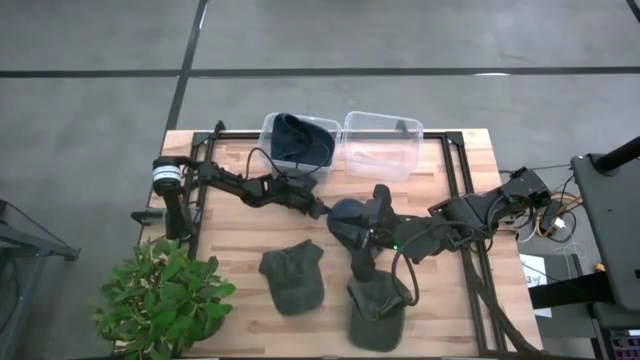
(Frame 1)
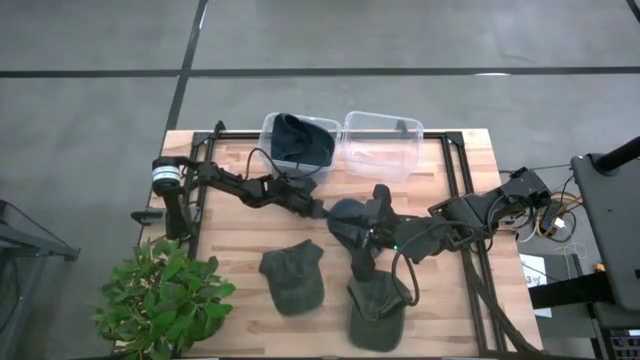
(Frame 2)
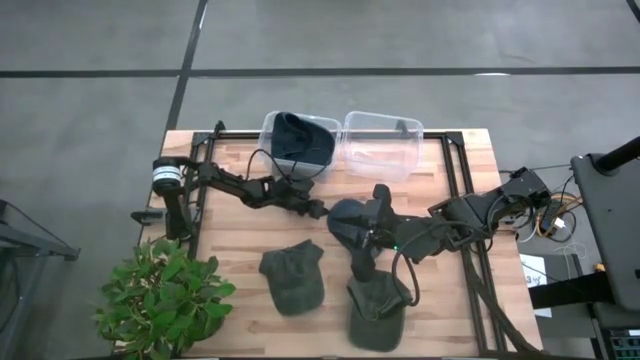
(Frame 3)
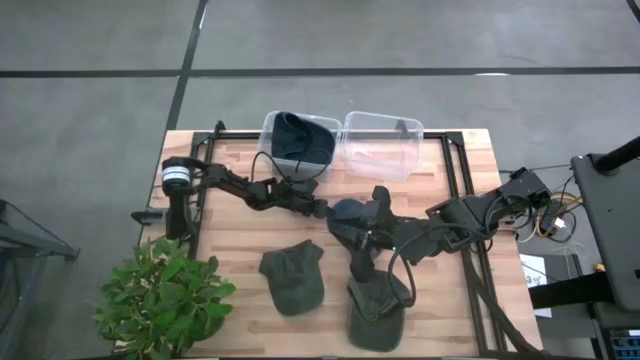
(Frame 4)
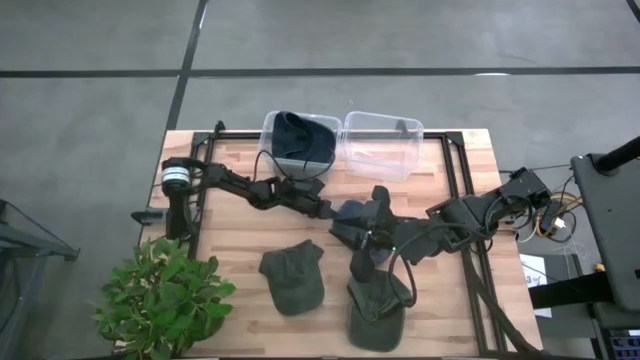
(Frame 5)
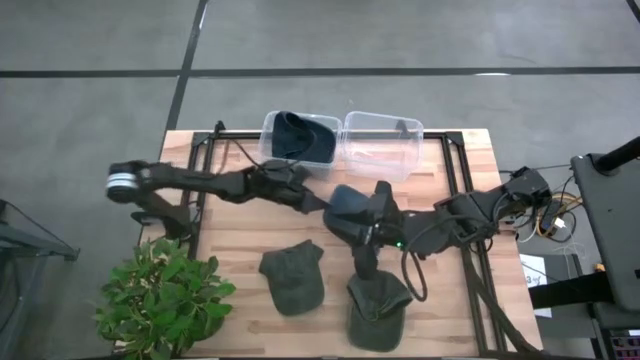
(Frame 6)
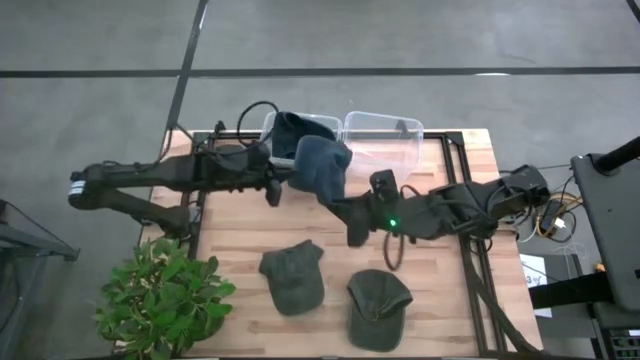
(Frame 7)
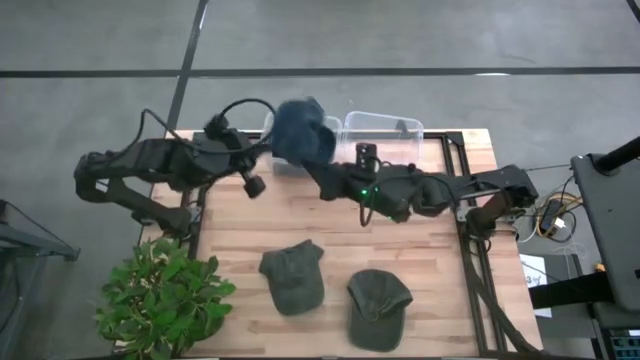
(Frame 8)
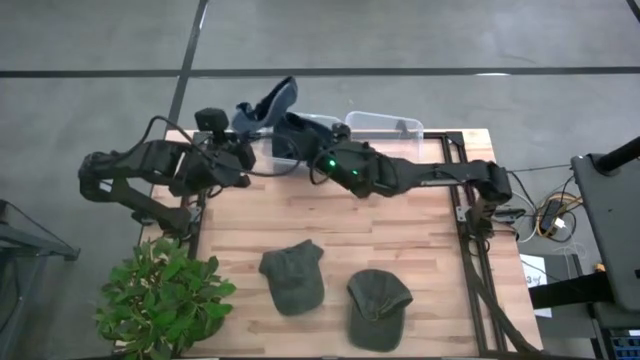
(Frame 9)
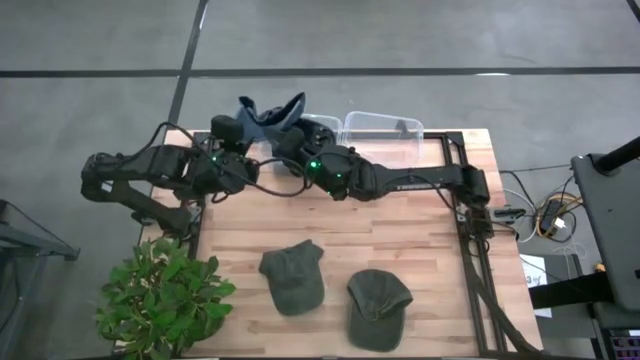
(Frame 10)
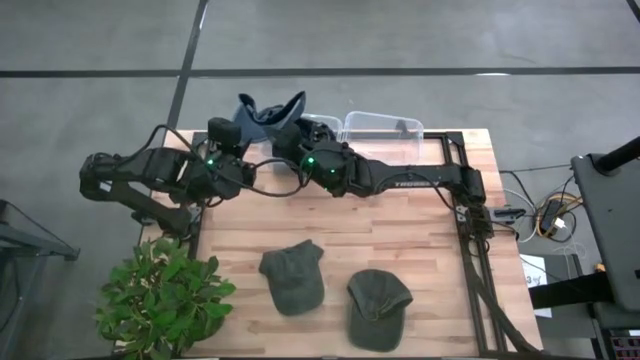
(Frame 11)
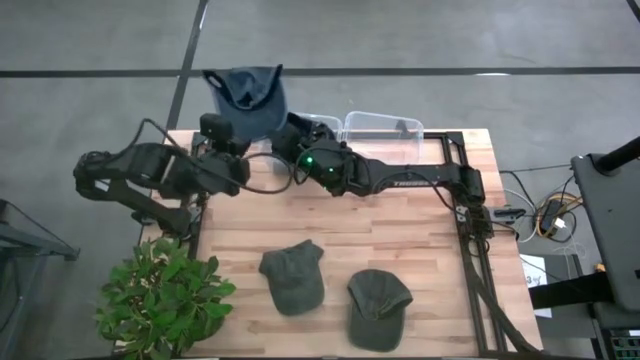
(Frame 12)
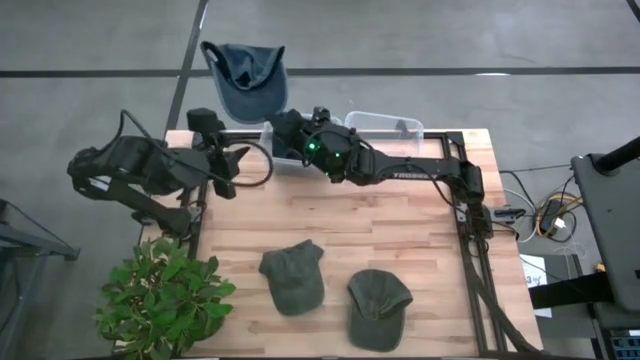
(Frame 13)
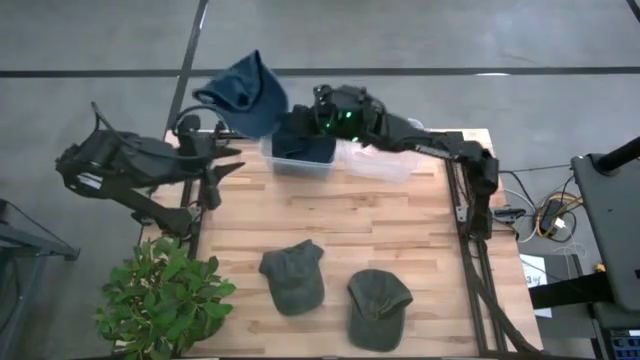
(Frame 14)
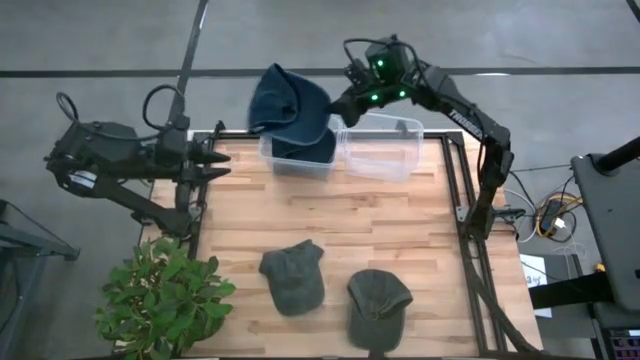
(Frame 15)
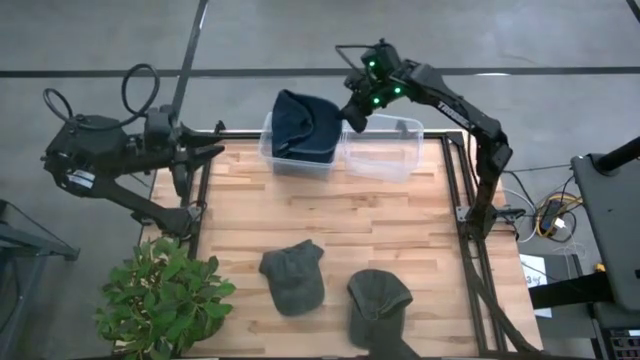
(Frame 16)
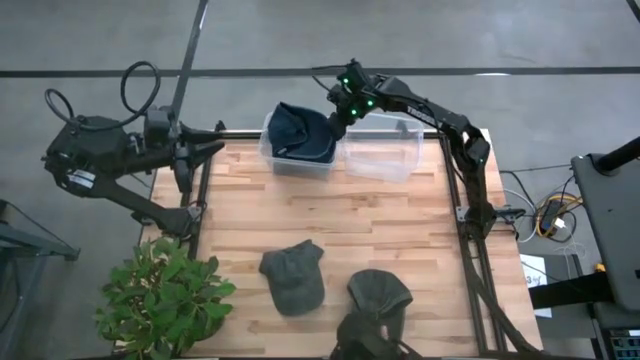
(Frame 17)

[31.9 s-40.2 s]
Task: Pick & Place hat
Put the blue cap into the left transparent bin

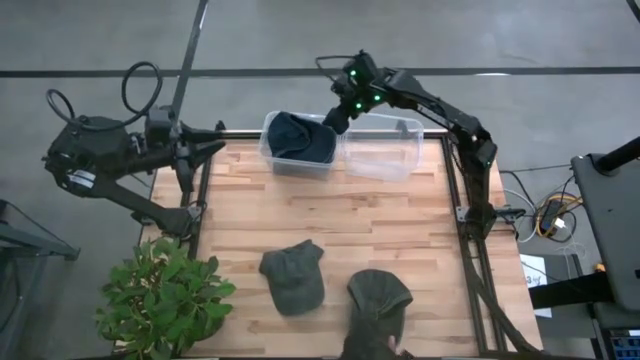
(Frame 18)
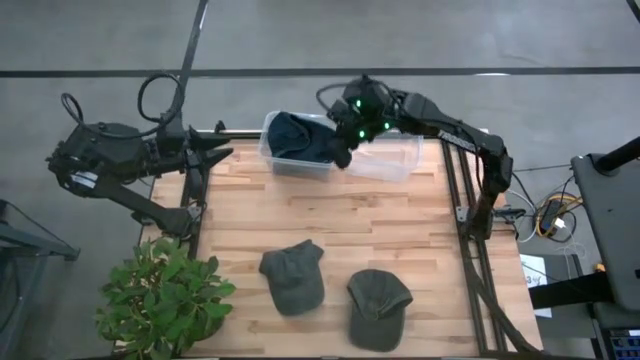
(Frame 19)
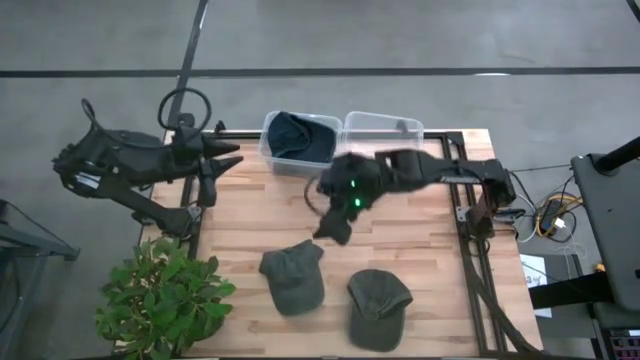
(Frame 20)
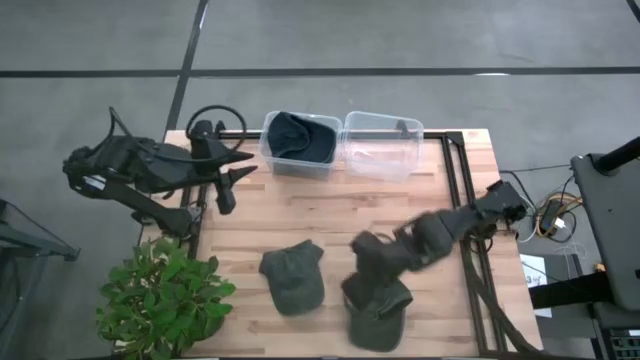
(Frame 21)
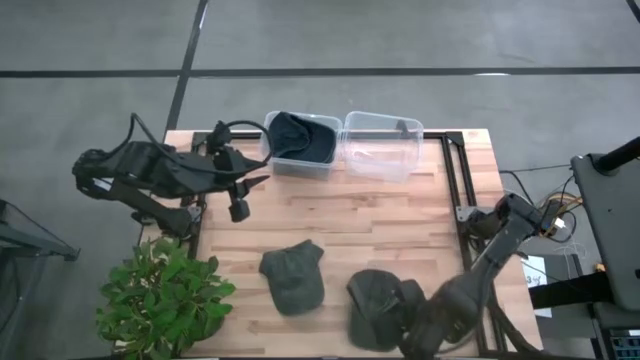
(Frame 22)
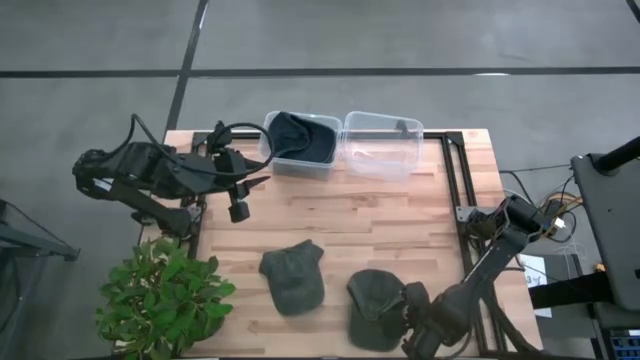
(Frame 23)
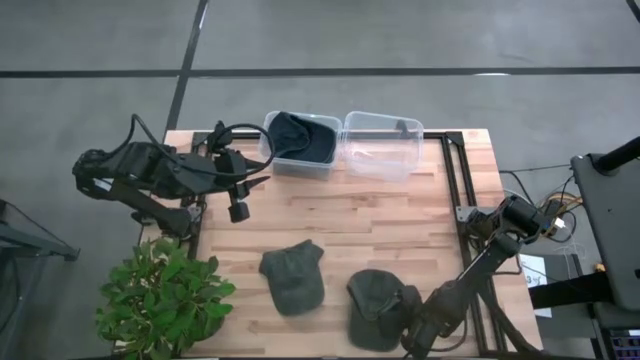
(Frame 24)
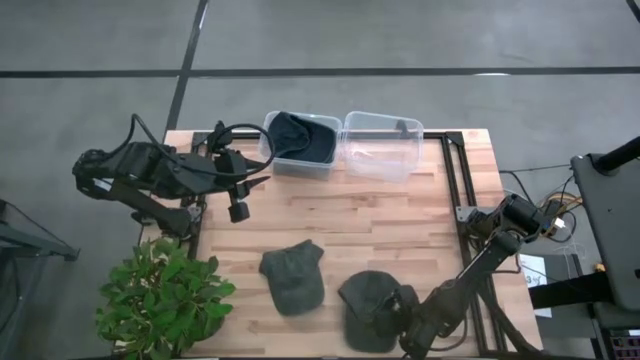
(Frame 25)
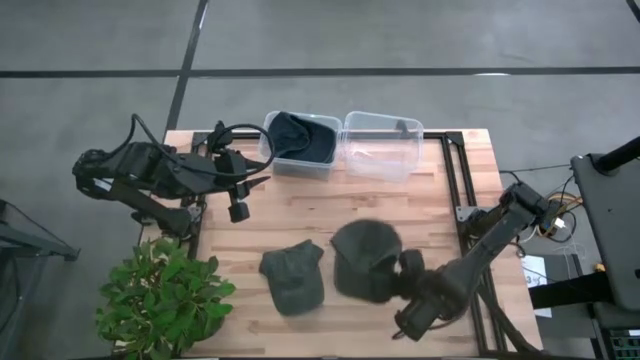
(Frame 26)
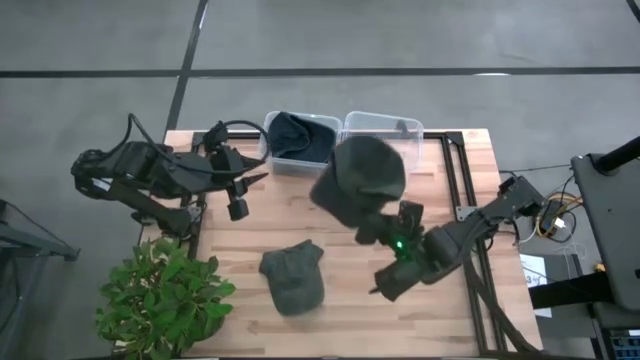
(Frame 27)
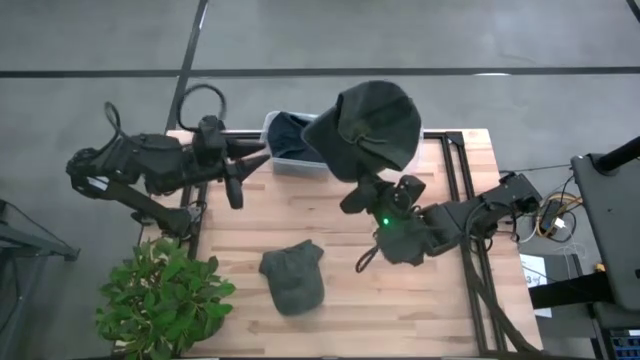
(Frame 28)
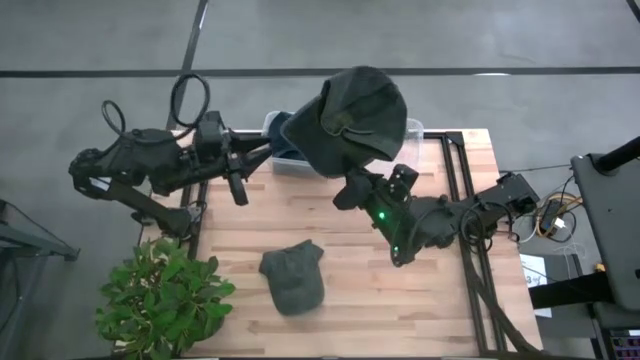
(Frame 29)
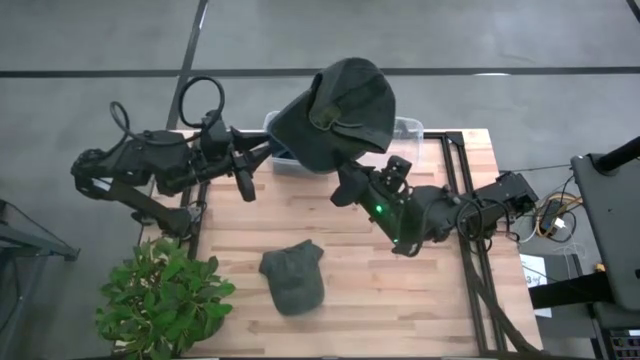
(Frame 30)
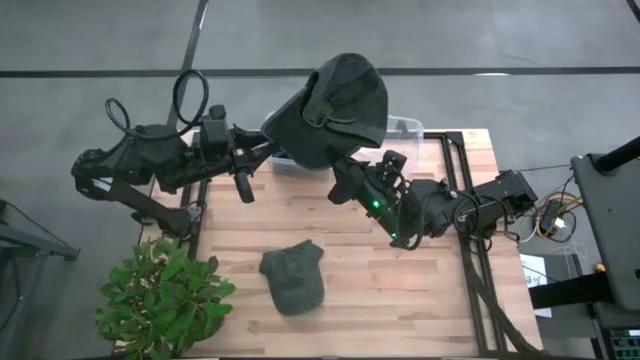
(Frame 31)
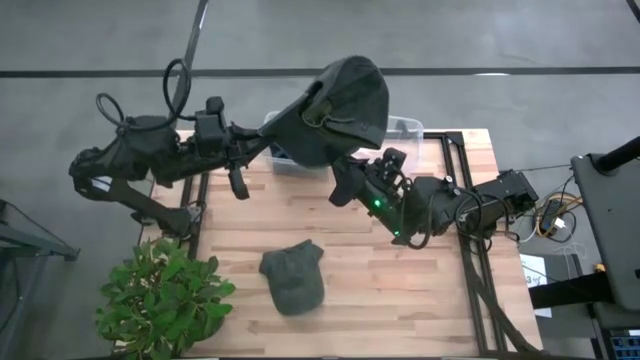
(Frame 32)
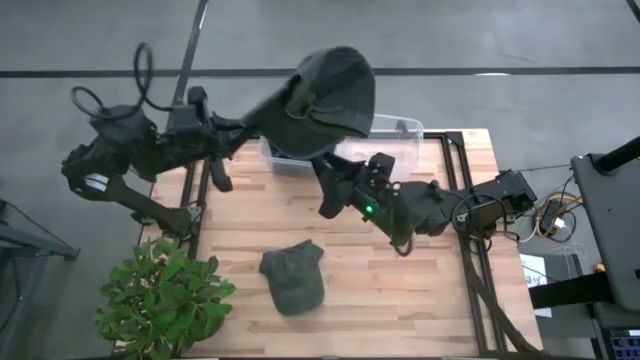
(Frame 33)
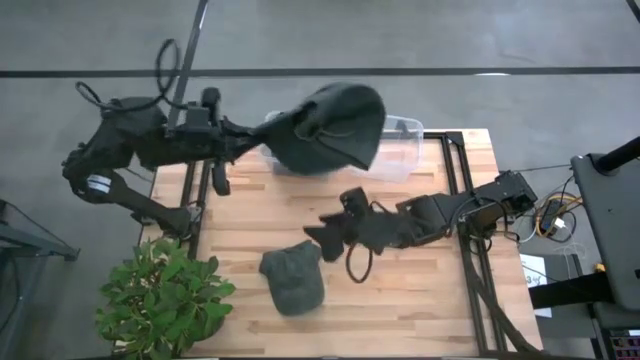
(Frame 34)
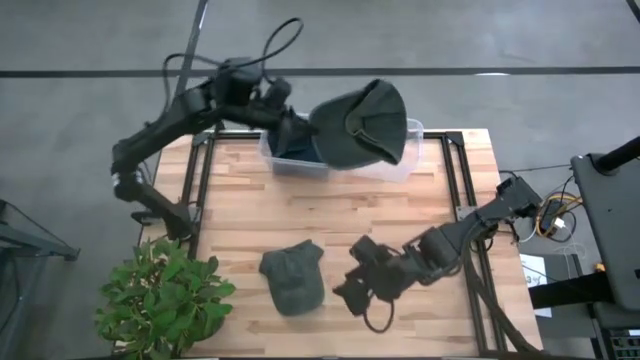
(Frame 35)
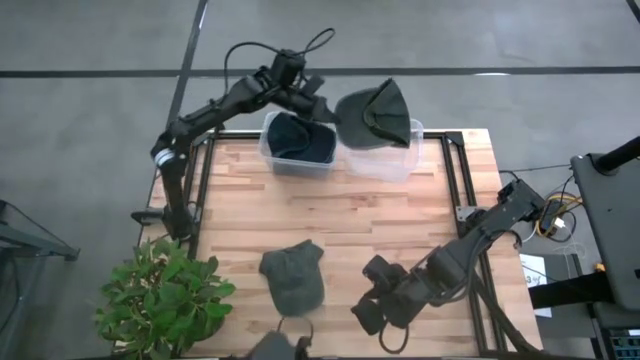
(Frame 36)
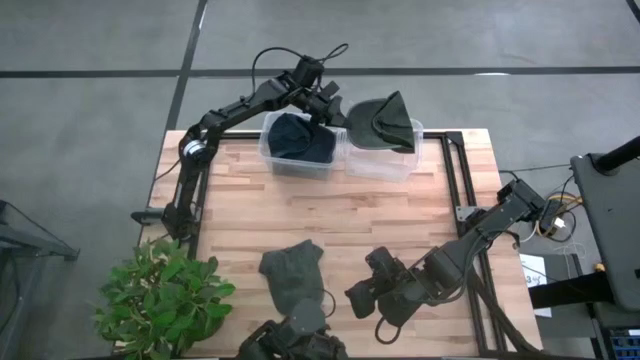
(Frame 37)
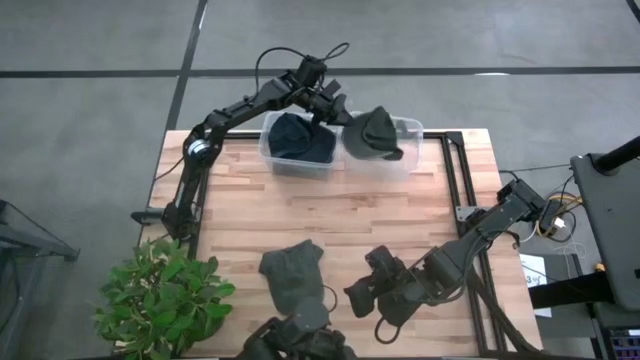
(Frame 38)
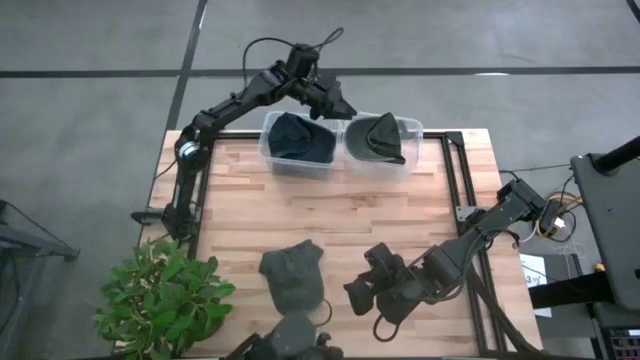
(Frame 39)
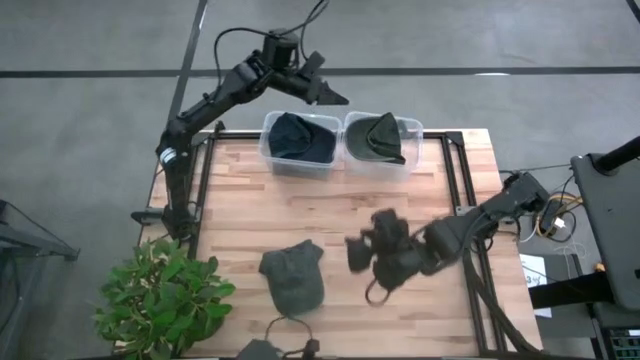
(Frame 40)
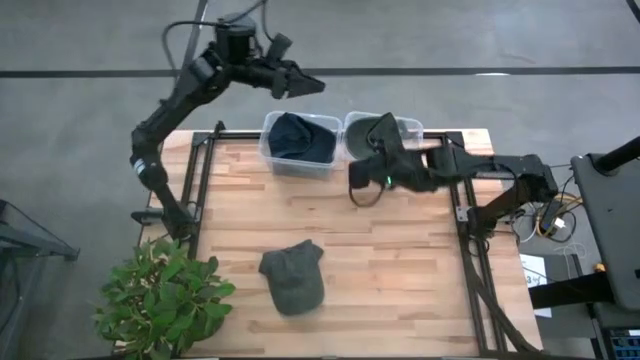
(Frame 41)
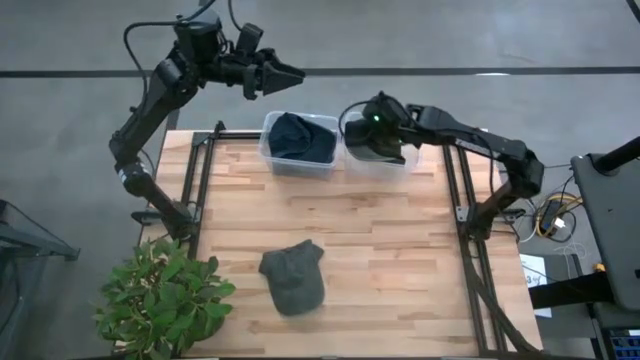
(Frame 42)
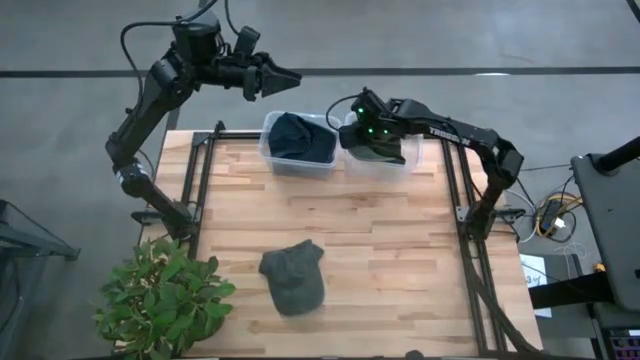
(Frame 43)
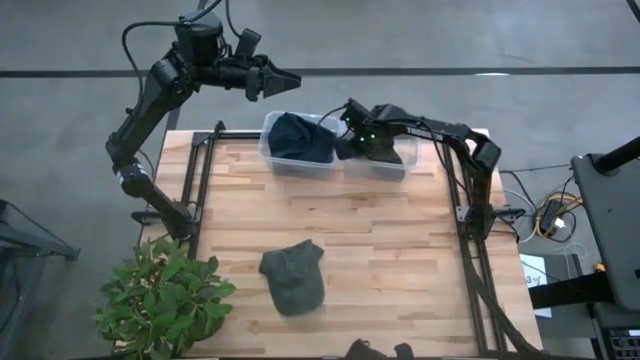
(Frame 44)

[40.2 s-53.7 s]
Put the right gray cap into the right transparent bin
